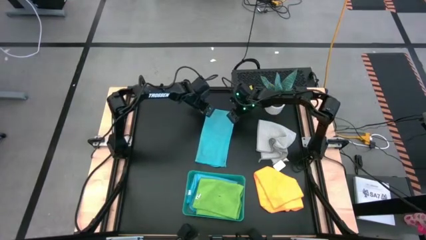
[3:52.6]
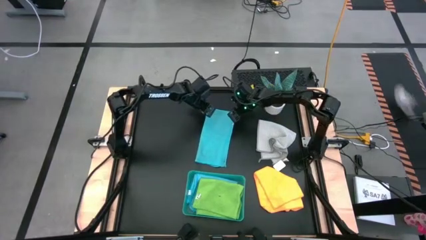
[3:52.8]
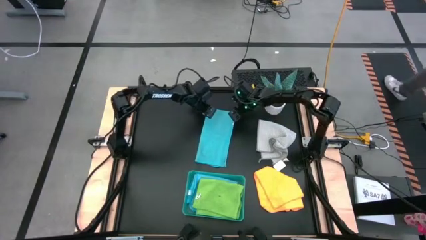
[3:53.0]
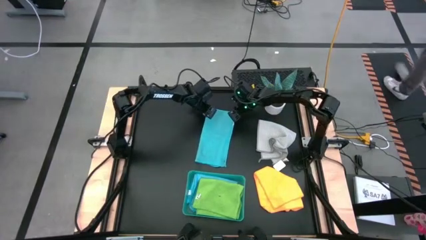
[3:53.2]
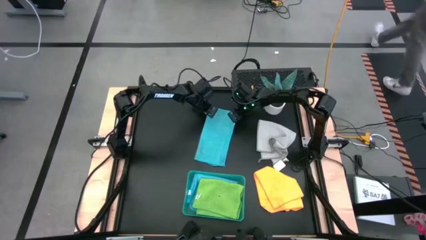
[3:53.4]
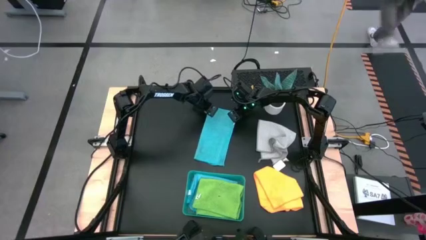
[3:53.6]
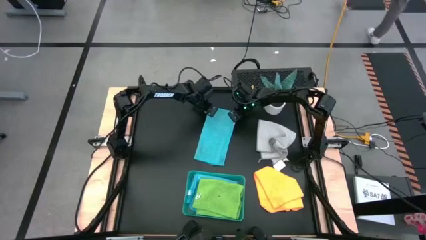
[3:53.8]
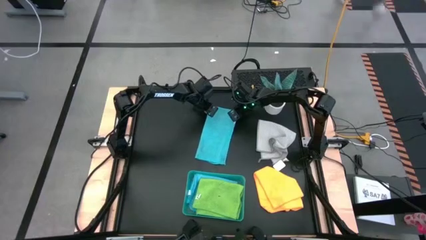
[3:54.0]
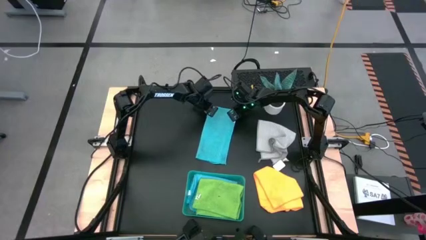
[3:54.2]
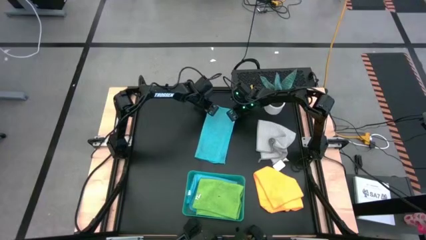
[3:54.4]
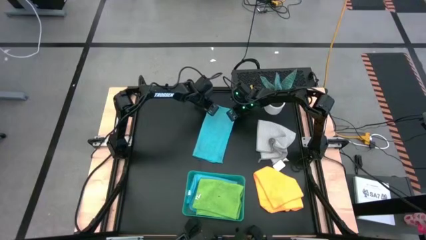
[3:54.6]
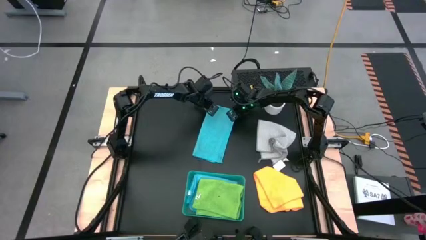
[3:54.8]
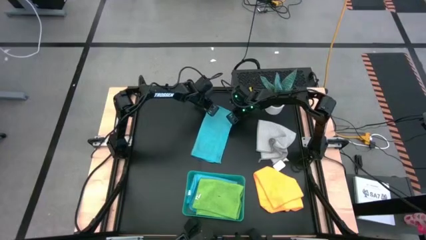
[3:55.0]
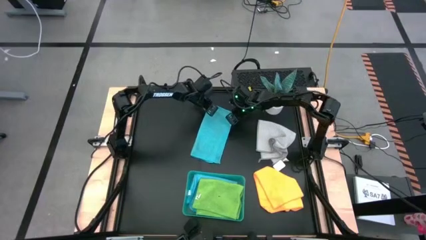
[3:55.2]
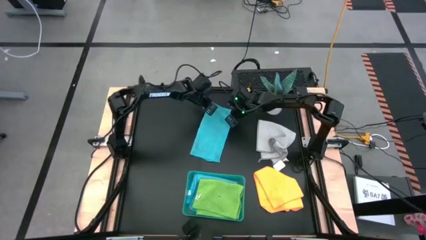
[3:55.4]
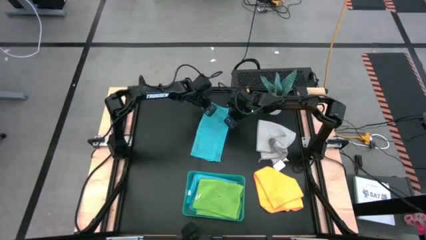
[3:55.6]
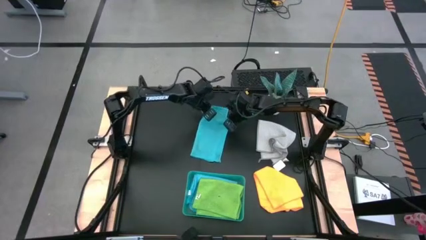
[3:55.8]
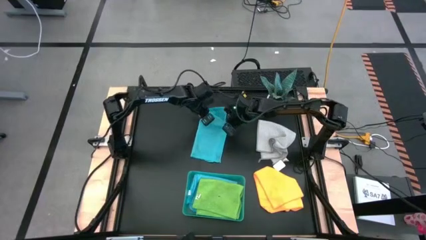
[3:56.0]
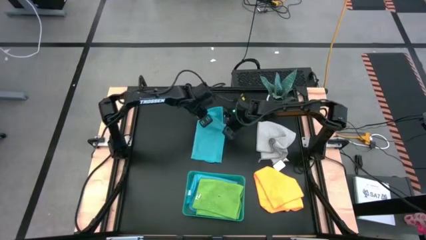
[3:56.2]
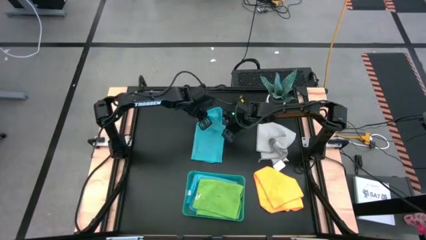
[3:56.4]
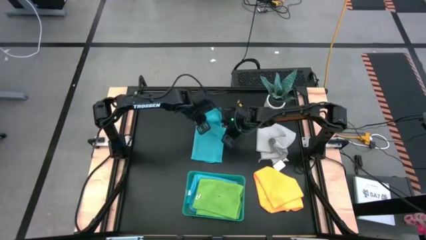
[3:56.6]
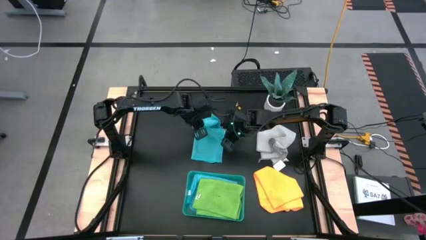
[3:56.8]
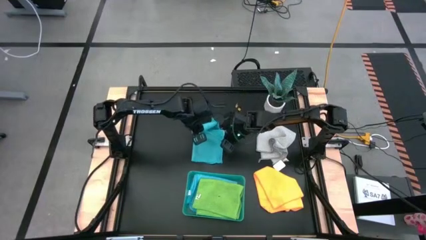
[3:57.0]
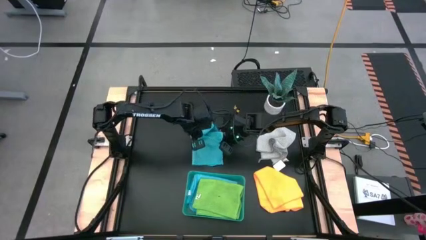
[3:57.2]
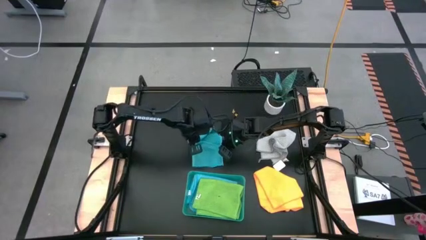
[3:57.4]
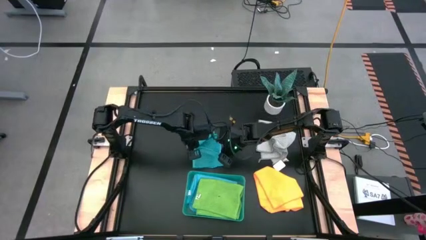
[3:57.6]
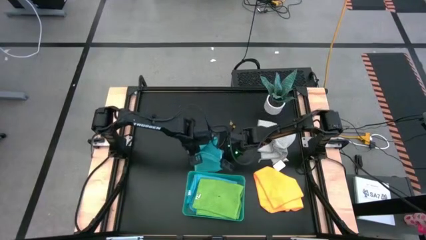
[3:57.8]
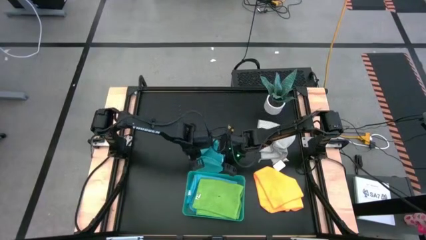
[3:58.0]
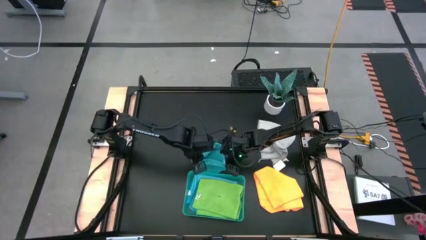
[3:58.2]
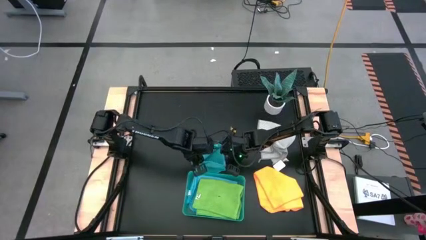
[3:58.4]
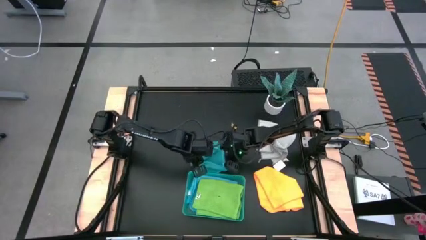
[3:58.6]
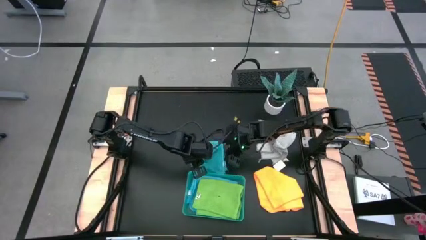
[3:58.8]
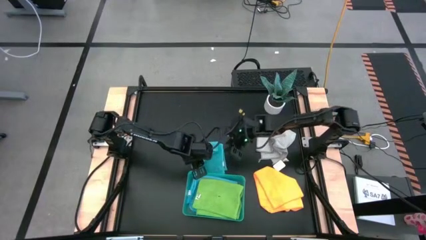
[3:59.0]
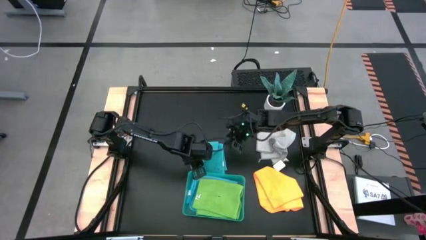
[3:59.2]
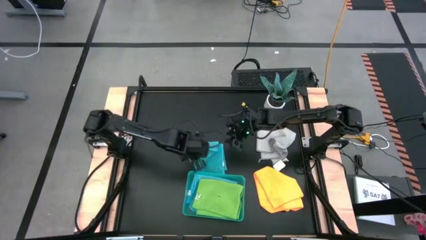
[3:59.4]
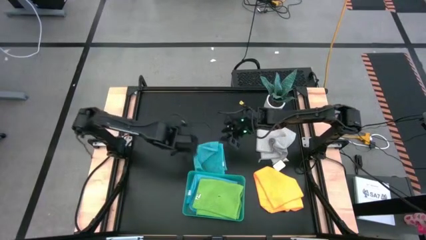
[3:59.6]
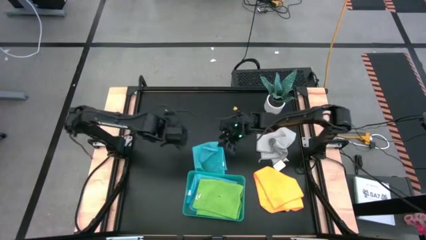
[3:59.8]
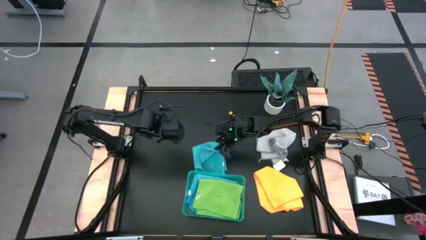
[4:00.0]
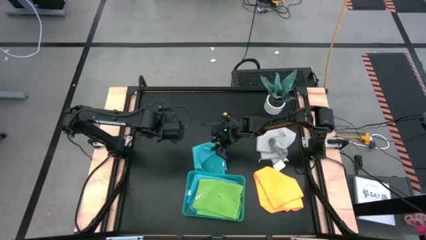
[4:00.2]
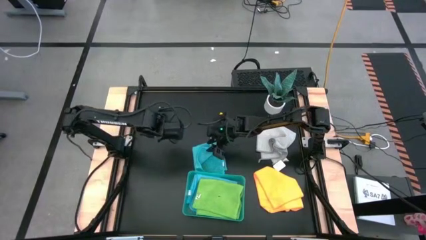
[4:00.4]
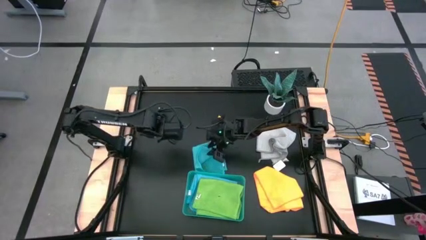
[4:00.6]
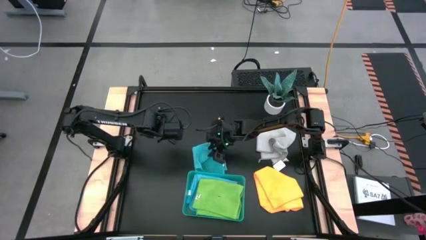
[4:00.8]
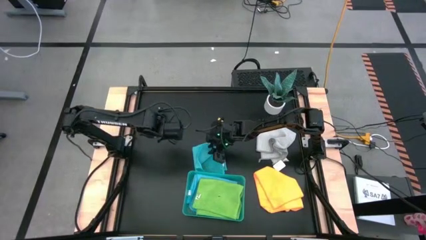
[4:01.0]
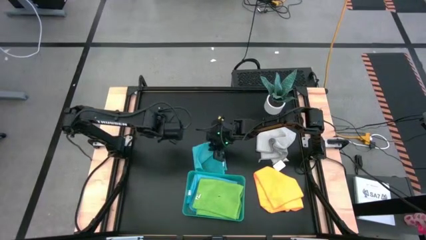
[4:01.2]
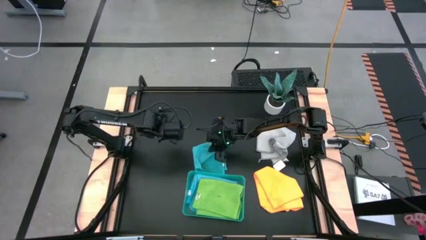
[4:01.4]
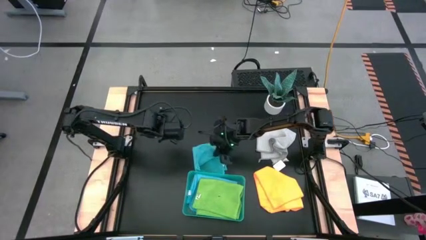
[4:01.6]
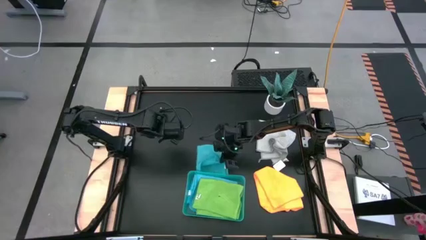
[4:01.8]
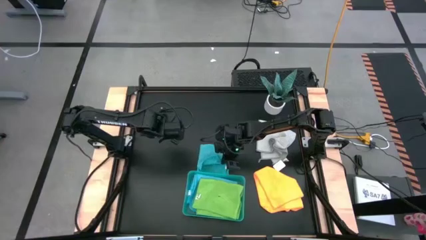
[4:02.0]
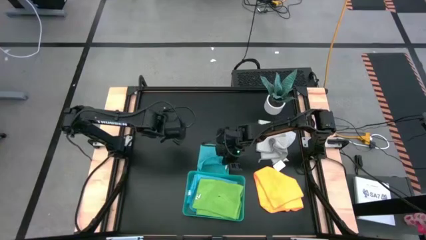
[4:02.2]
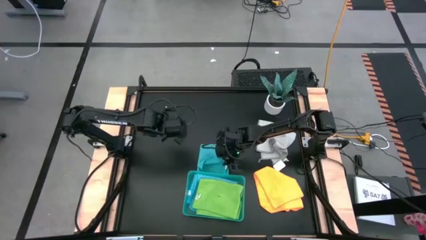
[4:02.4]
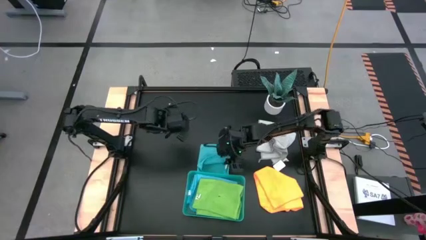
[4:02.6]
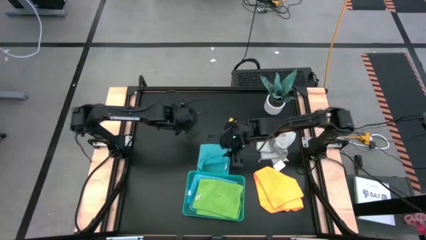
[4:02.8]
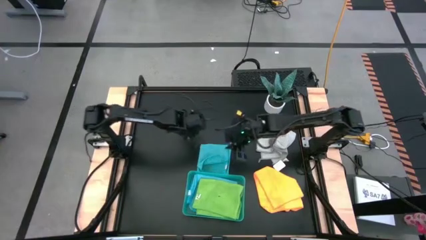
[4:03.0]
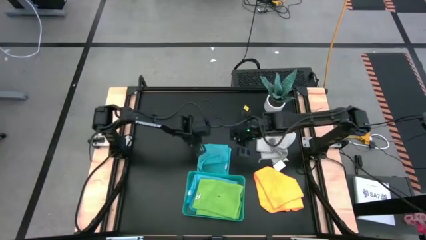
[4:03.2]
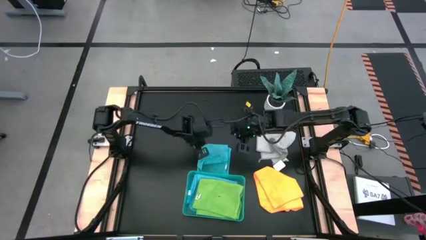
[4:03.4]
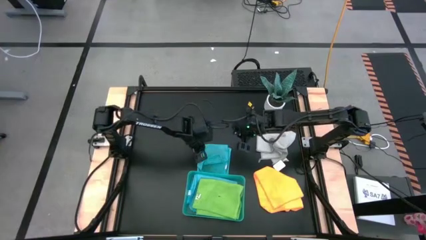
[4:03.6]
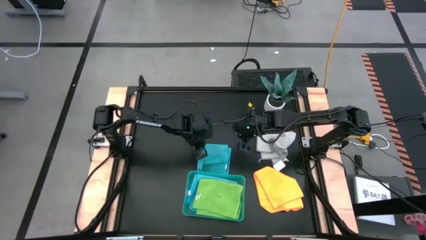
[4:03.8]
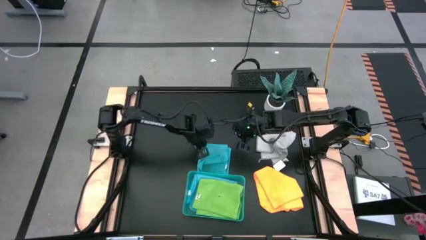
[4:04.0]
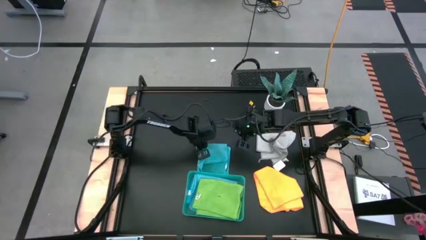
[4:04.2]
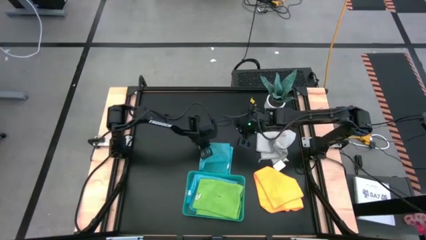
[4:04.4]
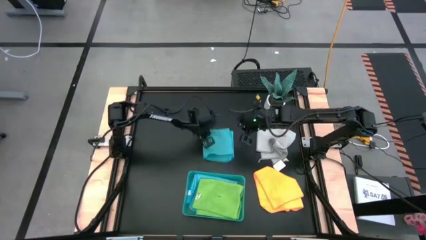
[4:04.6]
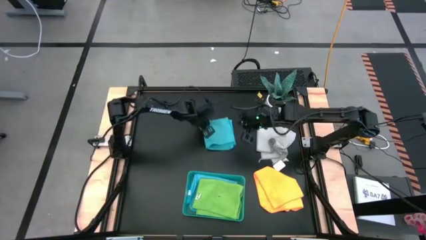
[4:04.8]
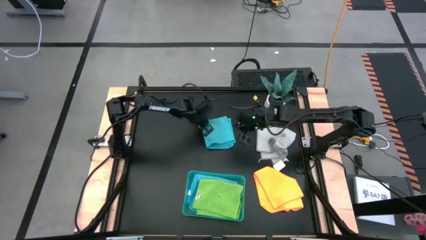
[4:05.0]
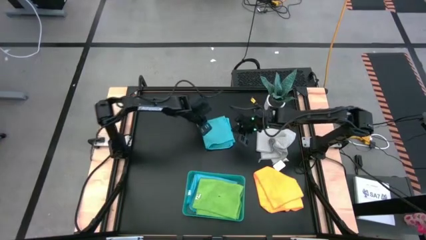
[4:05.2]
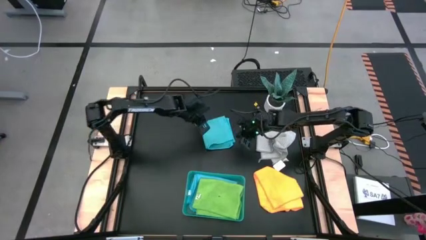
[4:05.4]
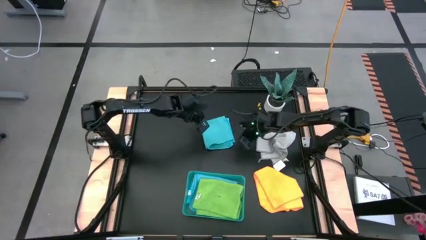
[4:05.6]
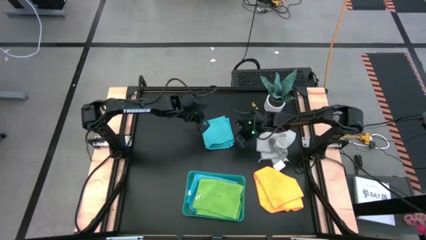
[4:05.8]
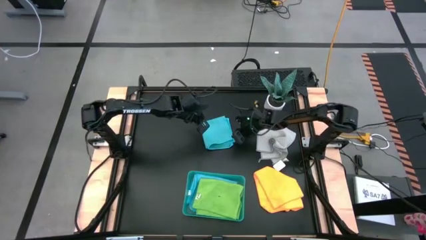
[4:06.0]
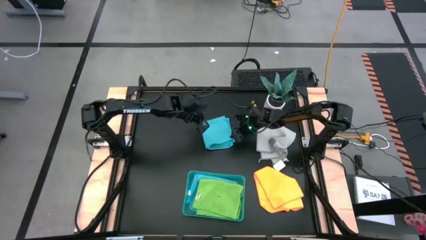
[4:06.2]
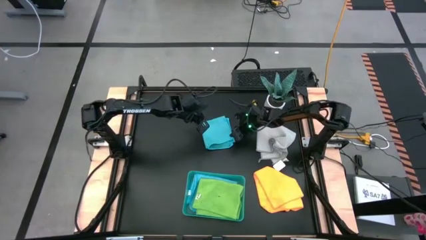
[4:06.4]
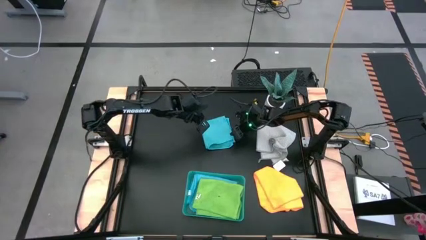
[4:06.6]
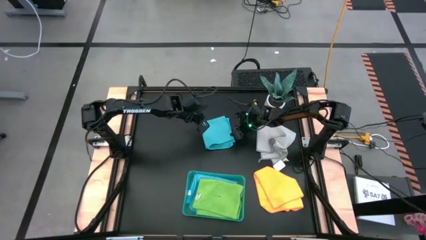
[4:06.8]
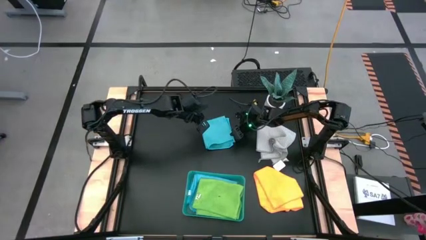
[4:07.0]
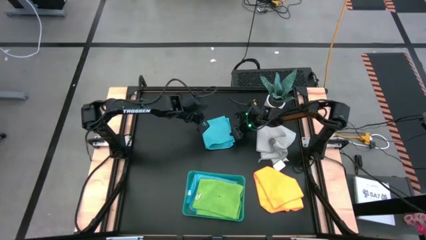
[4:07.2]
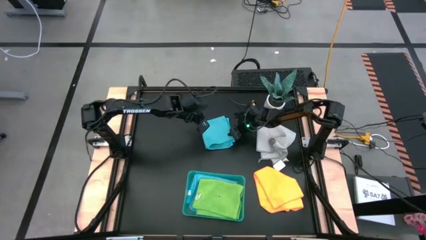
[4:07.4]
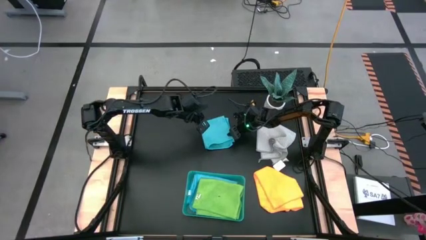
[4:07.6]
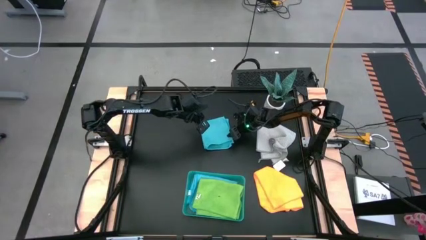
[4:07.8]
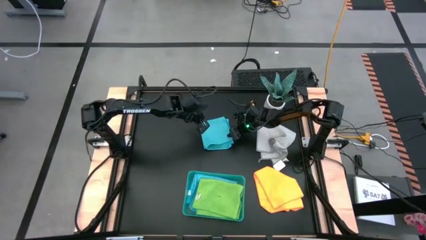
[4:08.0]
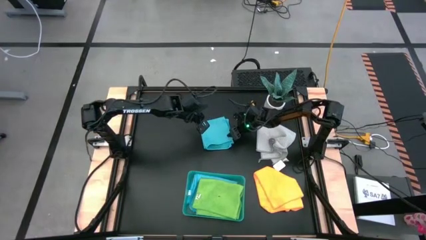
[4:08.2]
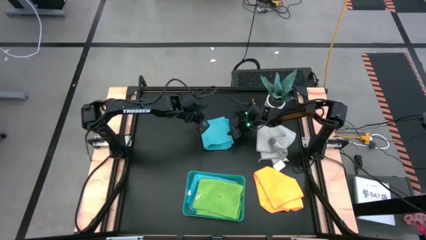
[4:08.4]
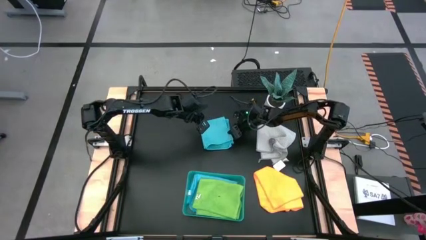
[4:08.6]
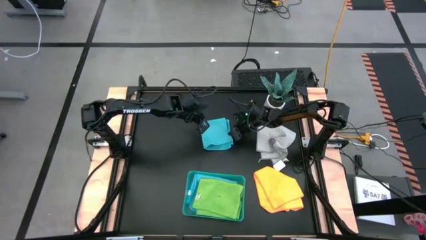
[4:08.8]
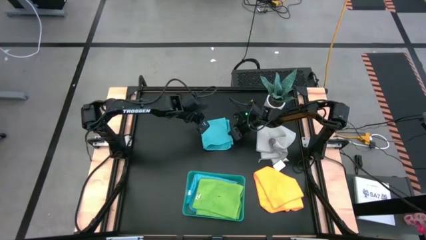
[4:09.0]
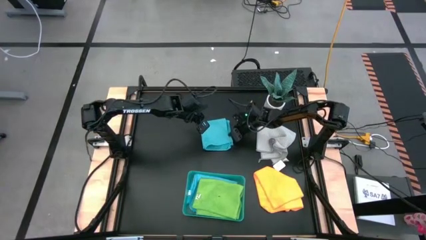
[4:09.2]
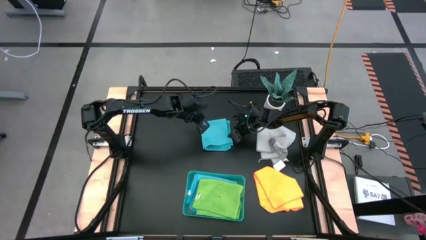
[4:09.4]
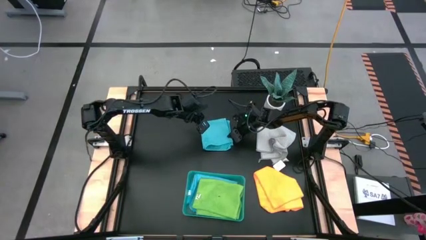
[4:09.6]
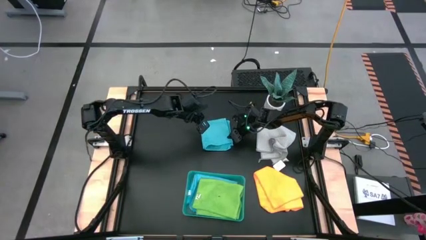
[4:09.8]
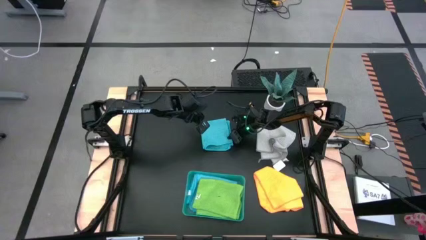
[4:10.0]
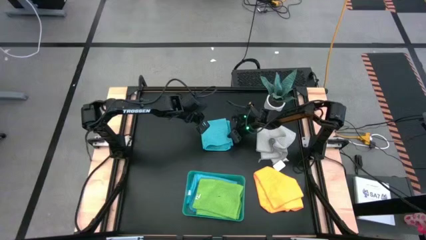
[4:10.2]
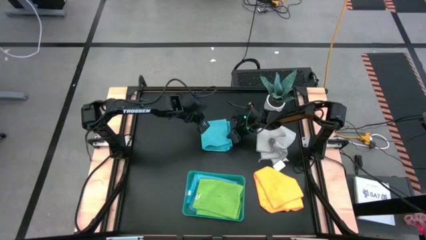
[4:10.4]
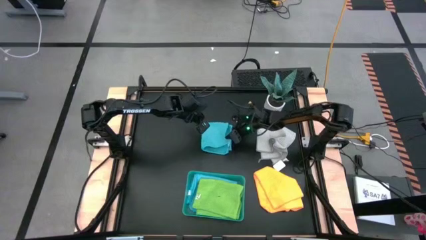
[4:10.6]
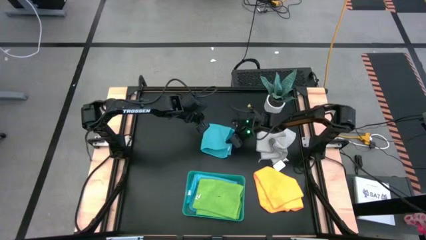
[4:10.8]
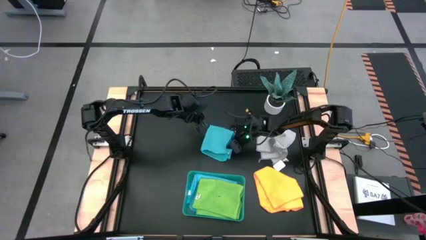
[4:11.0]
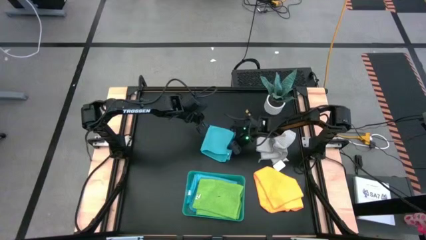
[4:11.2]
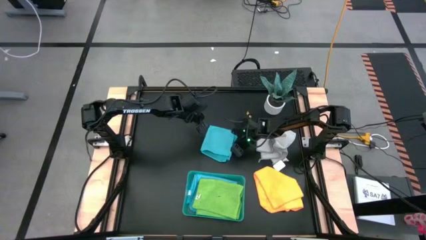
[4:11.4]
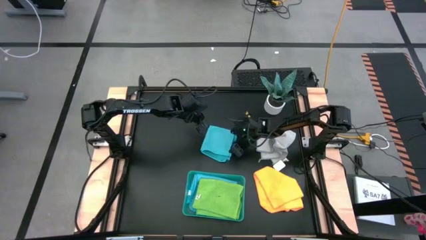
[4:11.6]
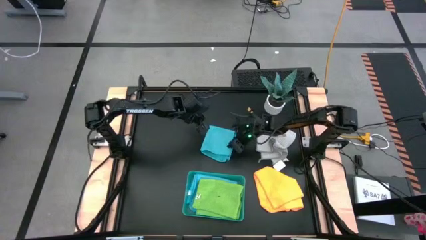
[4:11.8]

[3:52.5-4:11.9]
Task: Fold microfiber towels
Fold the blue microfiber cloth
